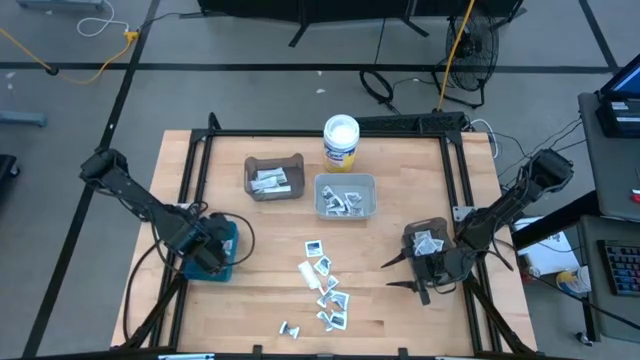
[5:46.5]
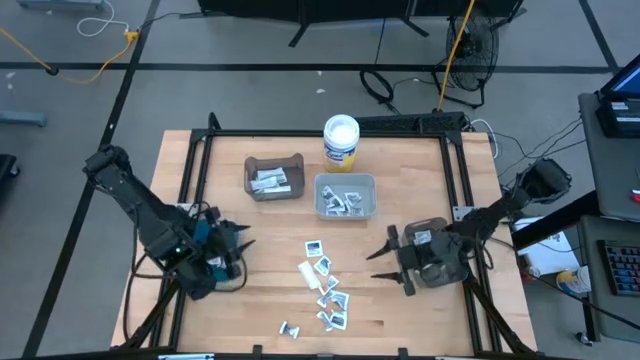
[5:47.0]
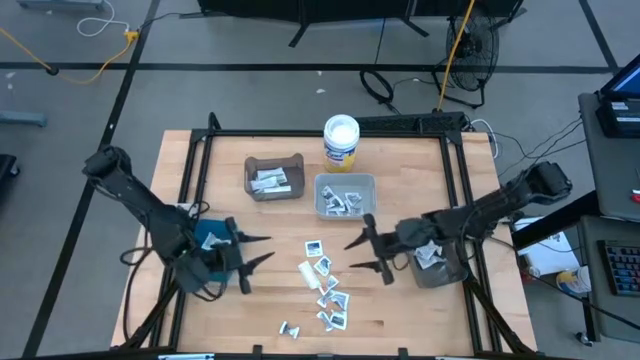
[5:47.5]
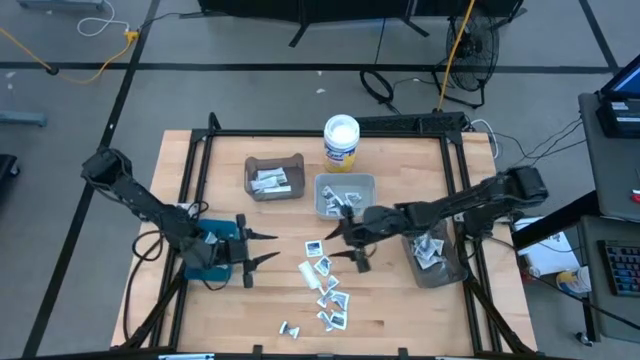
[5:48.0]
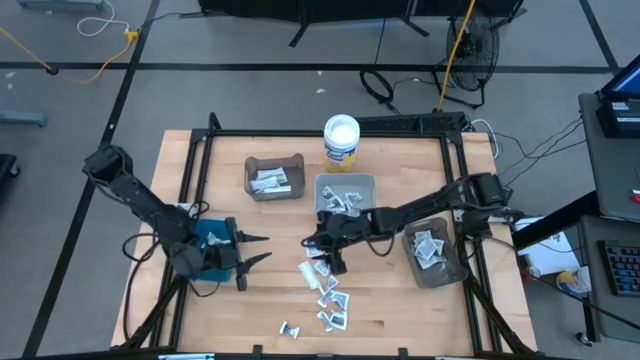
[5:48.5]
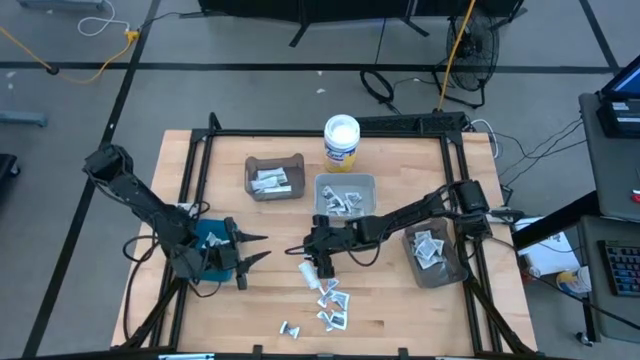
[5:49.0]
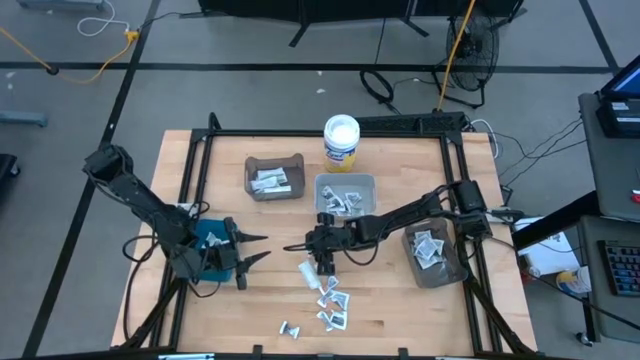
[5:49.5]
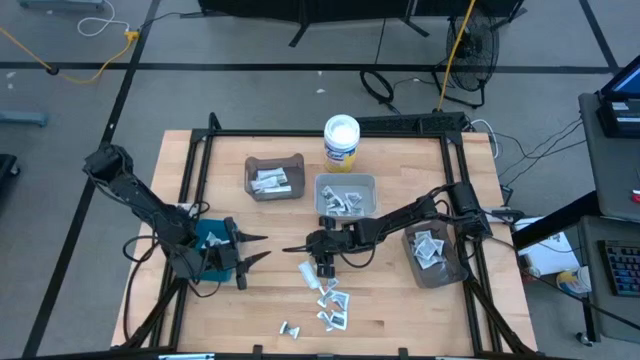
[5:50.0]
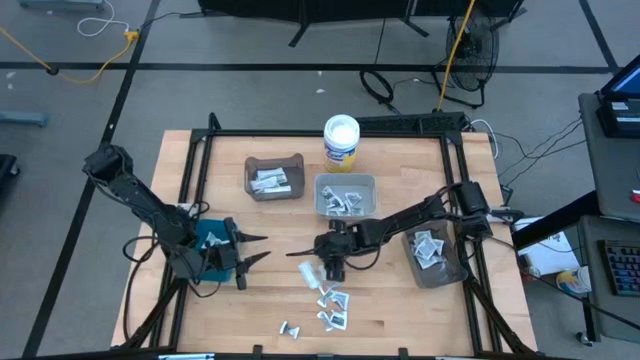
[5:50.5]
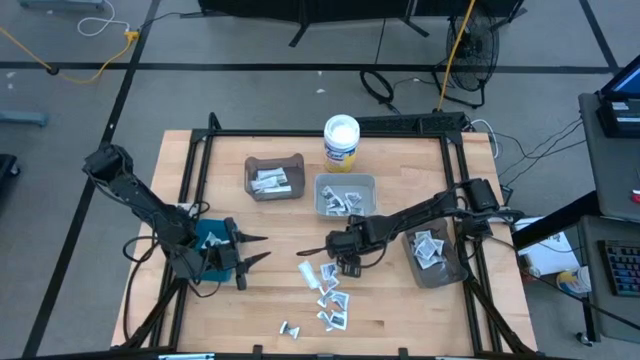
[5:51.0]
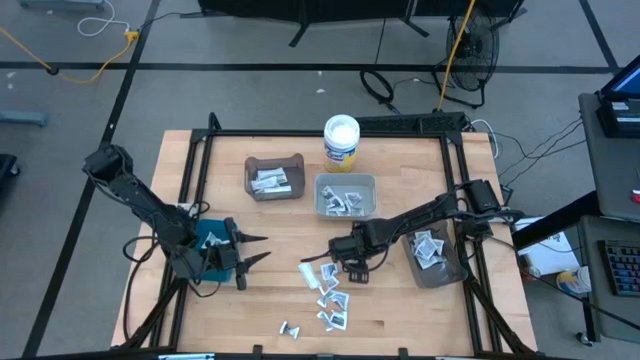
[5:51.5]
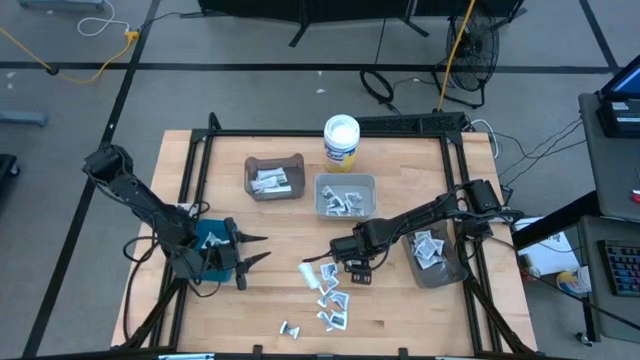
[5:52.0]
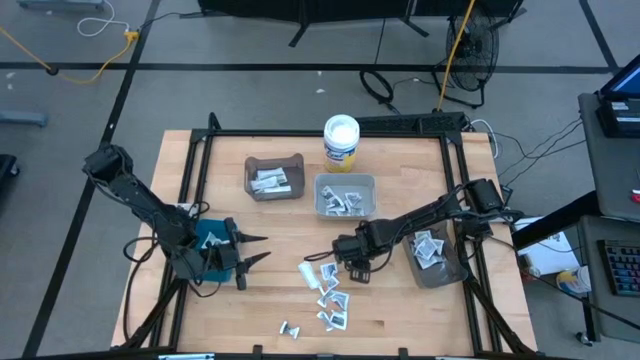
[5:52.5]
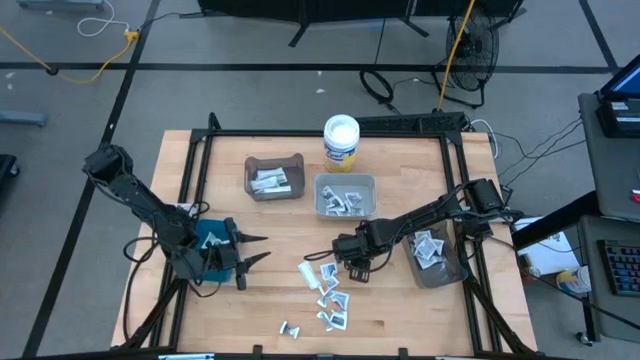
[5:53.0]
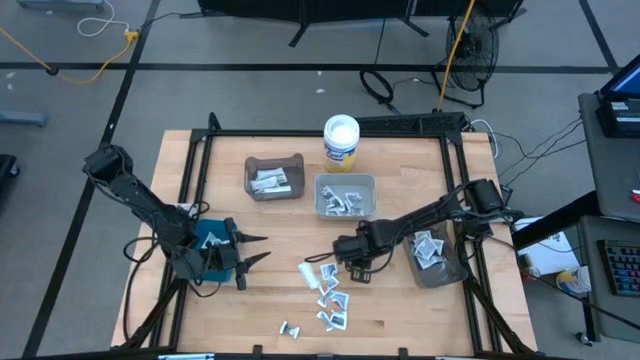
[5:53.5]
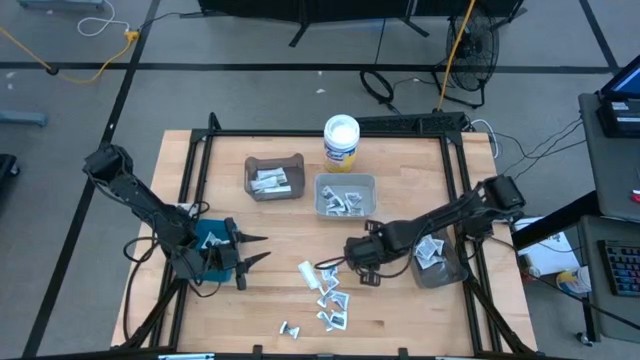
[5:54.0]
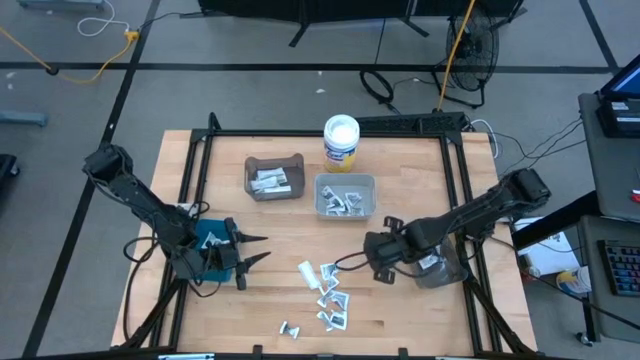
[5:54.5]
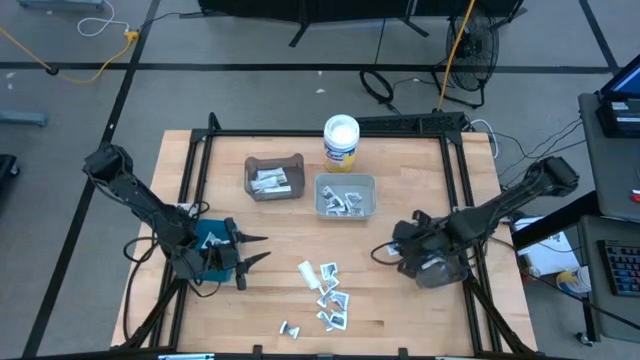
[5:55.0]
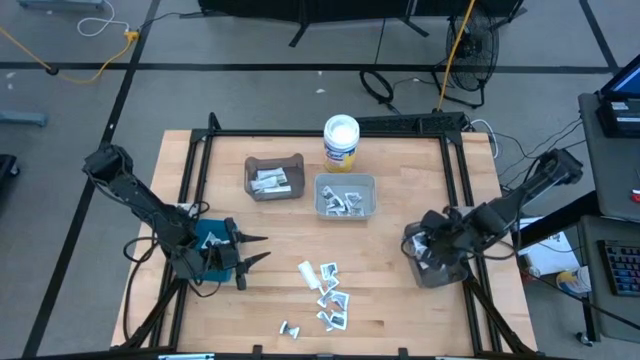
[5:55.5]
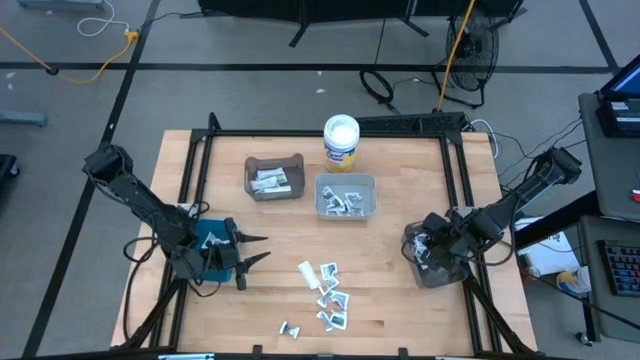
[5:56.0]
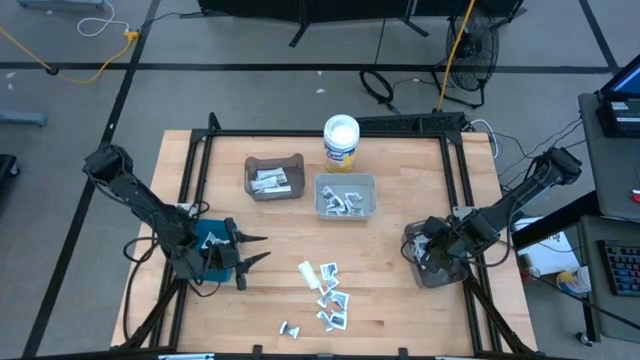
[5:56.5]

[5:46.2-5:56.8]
Task: Pick & Place First Aid Supplies
Put the blue alcohol pad into the bottom black bin

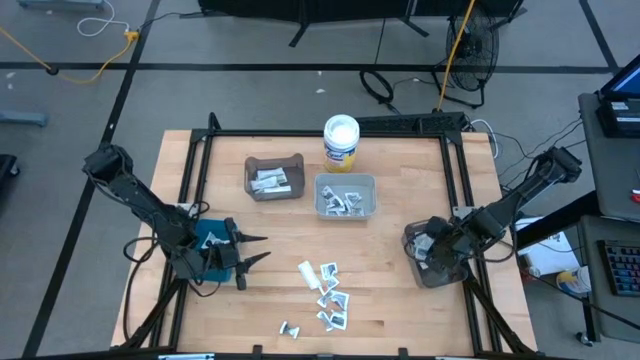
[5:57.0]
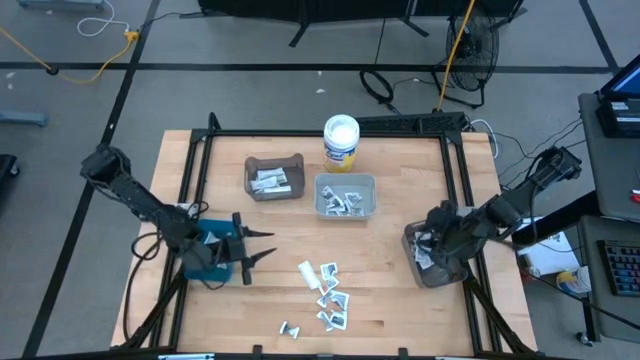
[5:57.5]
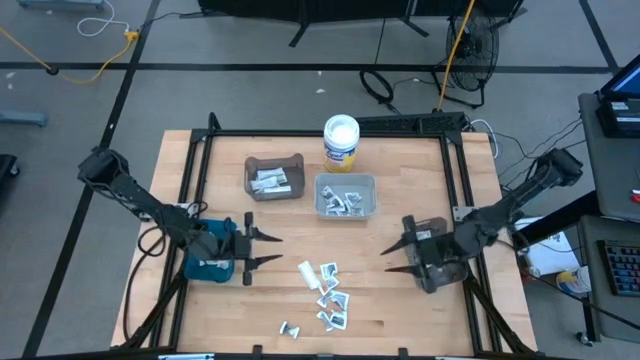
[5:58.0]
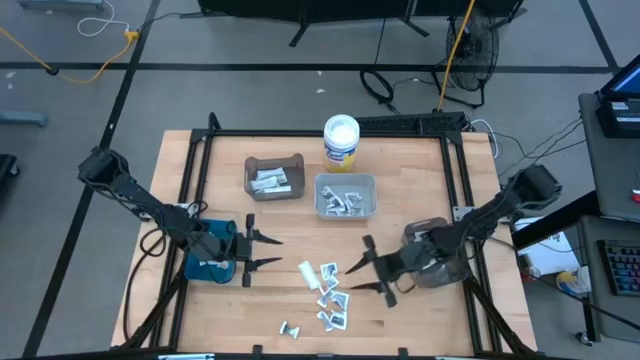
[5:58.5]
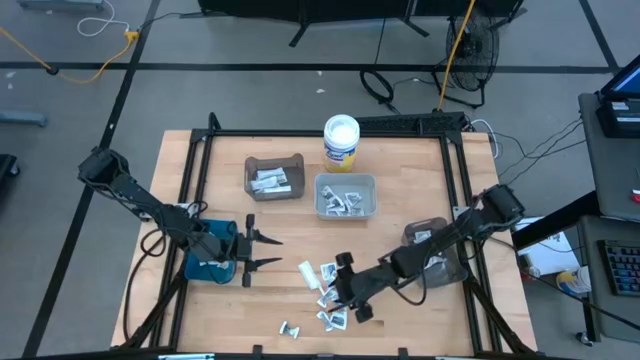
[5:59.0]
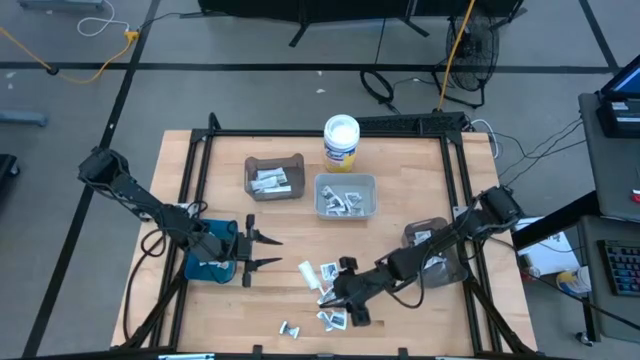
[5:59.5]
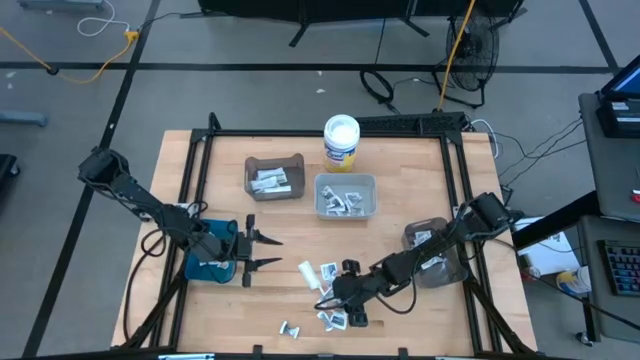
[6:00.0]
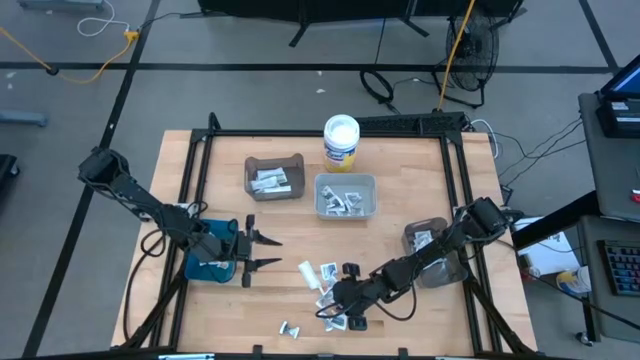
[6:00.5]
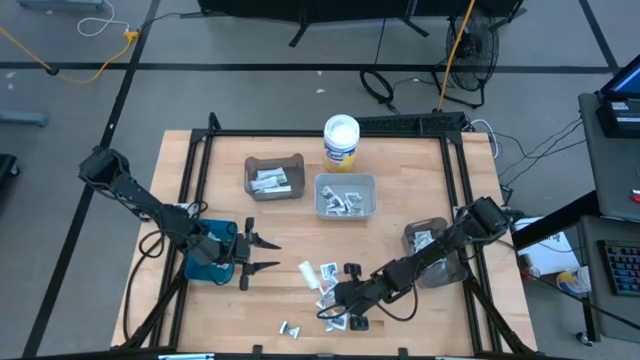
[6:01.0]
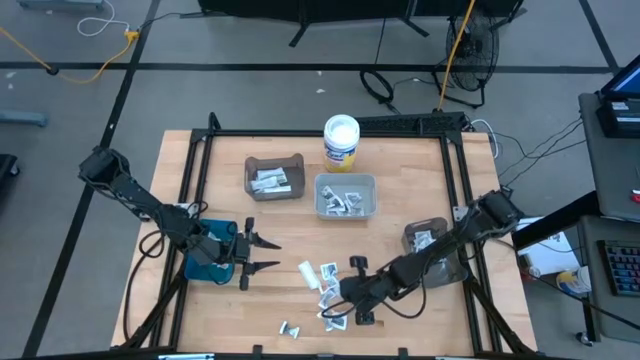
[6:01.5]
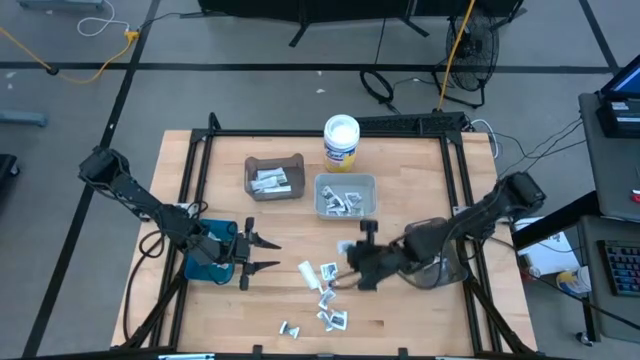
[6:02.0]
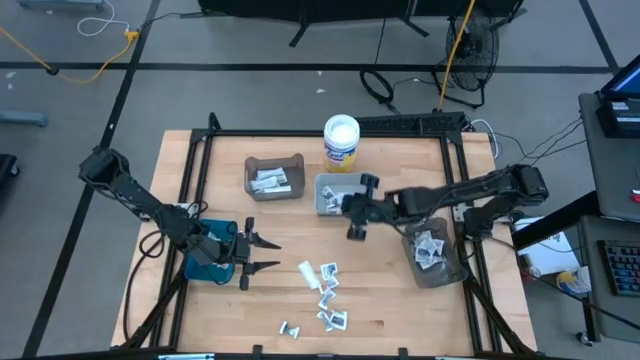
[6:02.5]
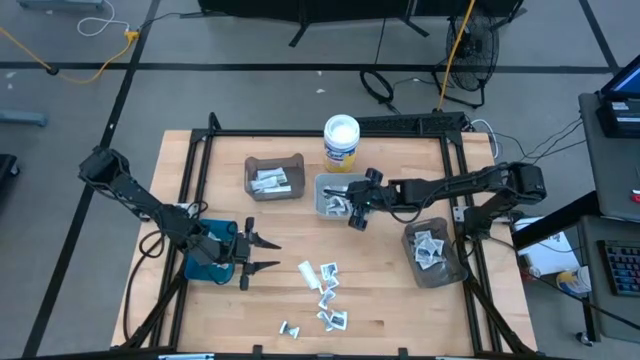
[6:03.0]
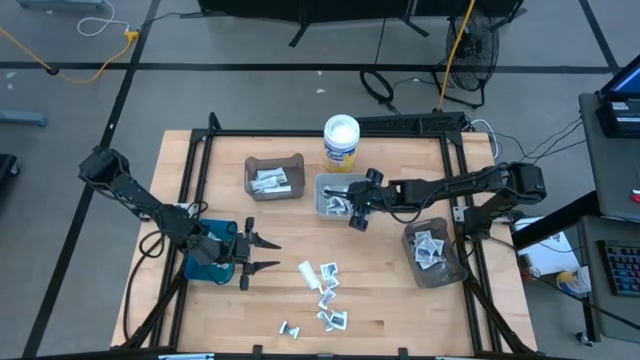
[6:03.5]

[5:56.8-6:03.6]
Put the gray towelette pack into the gray bin

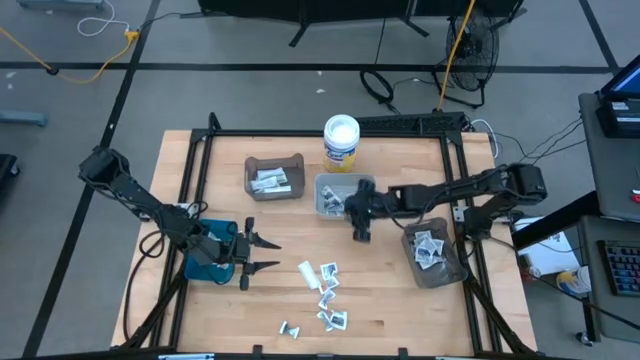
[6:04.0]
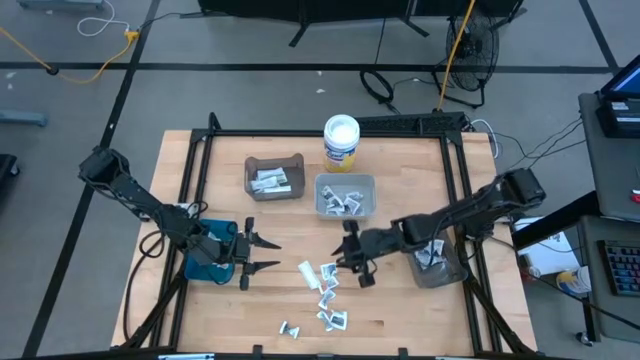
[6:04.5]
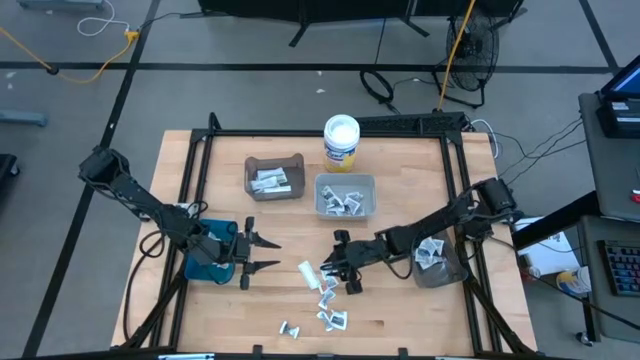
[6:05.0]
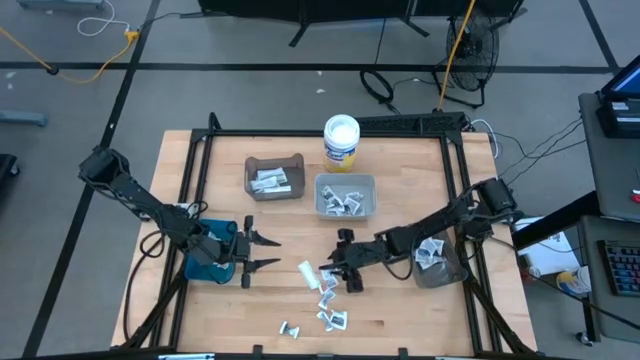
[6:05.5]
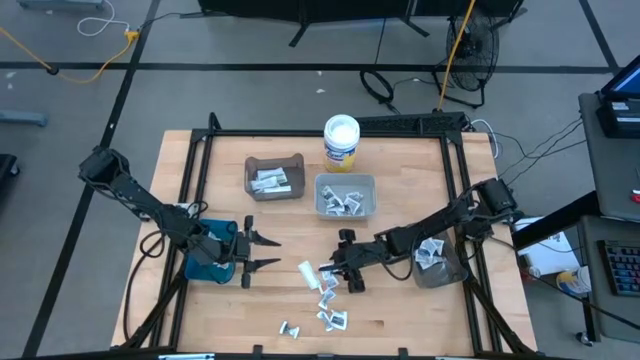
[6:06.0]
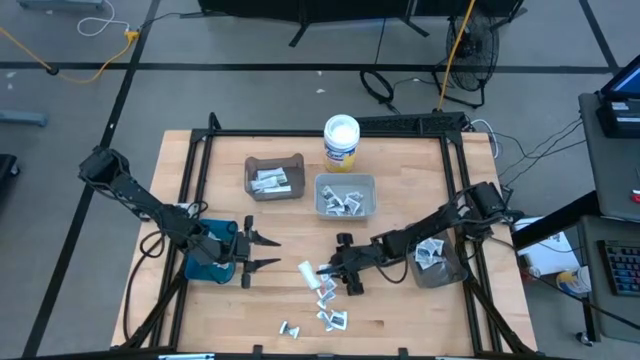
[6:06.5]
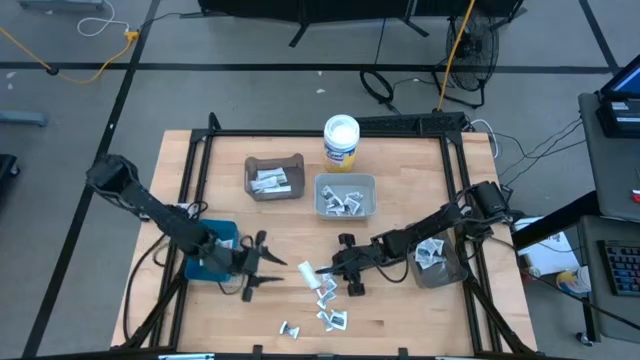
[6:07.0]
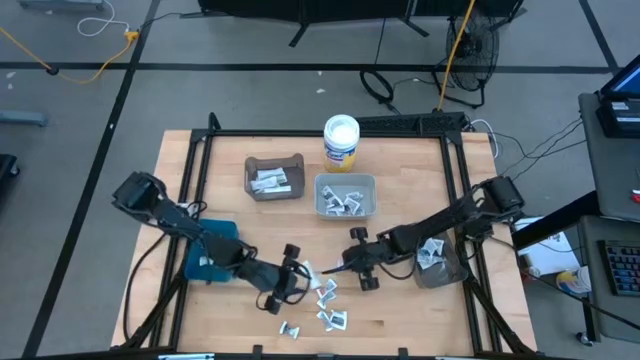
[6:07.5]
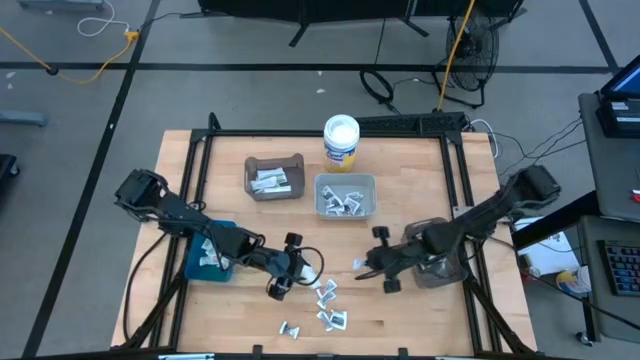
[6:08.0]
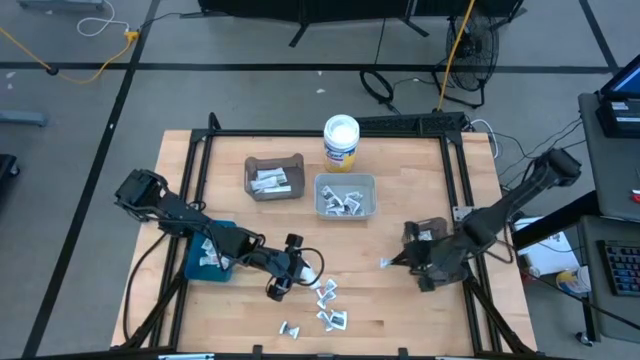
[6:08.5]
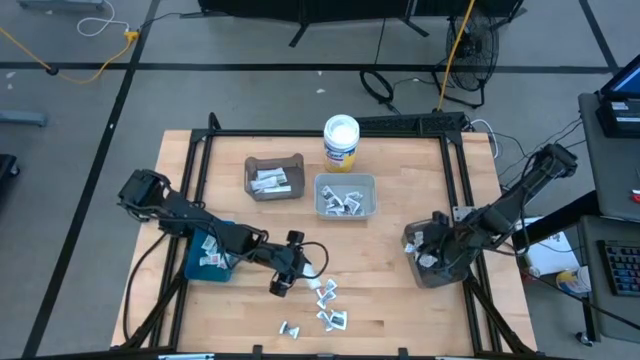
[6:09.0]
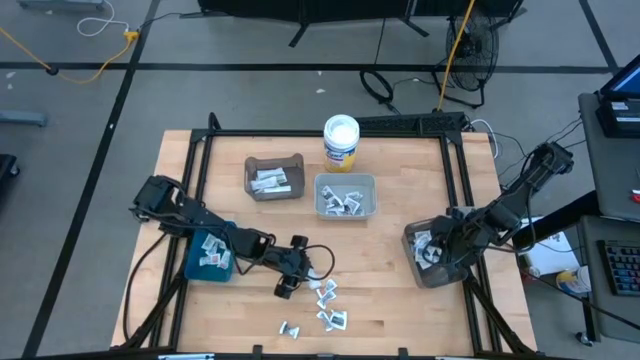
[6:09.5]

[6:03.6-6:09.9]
Put the blue alcohol pad into the bottom black bin
